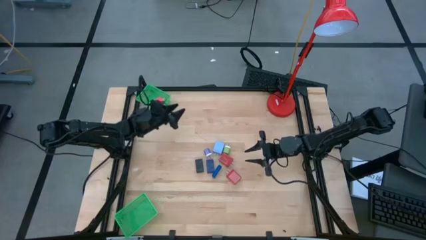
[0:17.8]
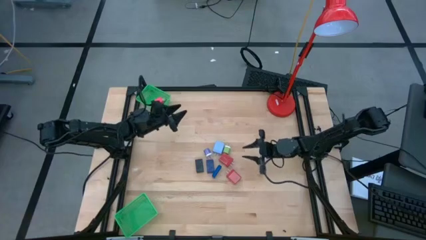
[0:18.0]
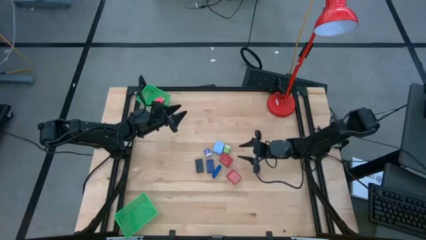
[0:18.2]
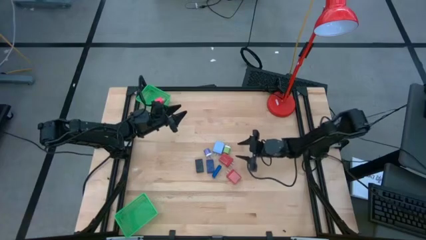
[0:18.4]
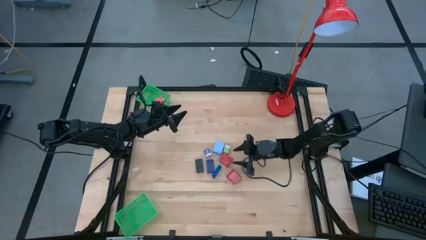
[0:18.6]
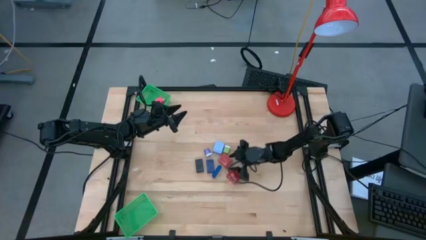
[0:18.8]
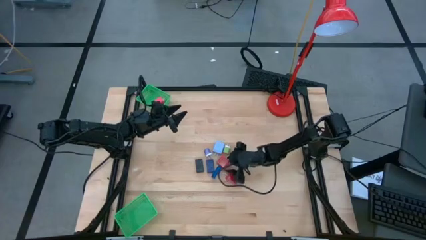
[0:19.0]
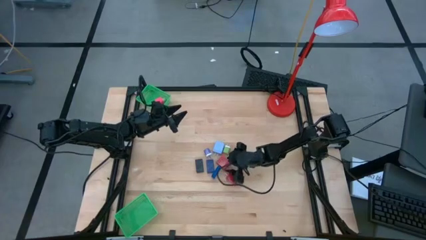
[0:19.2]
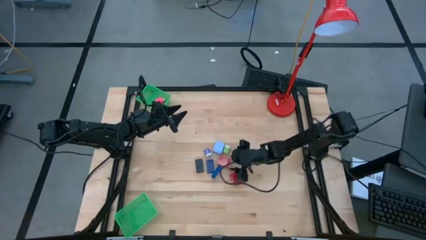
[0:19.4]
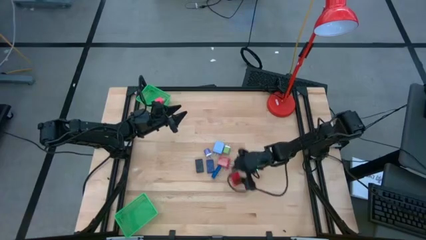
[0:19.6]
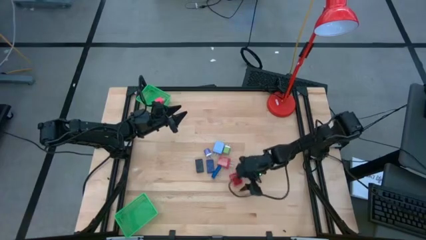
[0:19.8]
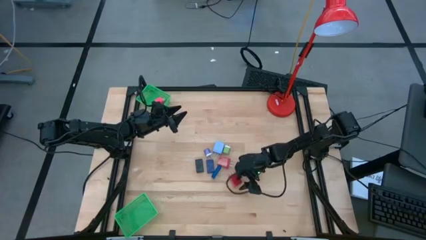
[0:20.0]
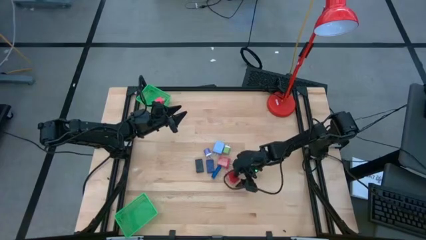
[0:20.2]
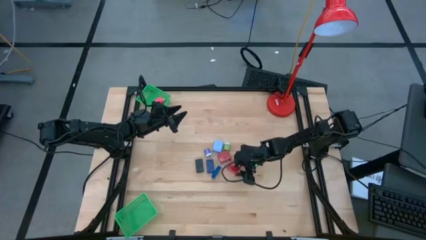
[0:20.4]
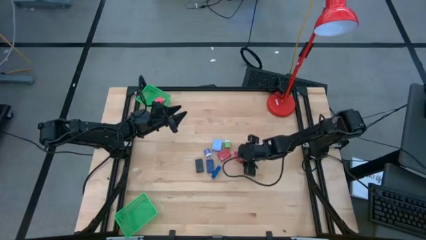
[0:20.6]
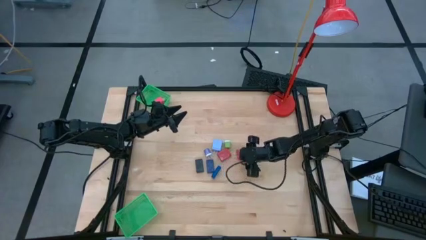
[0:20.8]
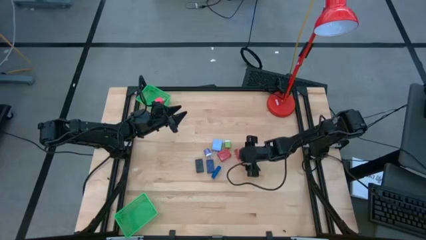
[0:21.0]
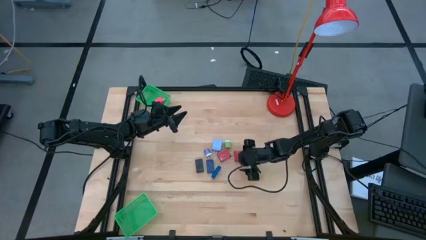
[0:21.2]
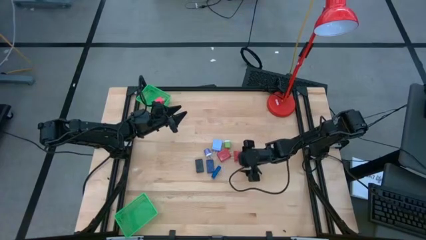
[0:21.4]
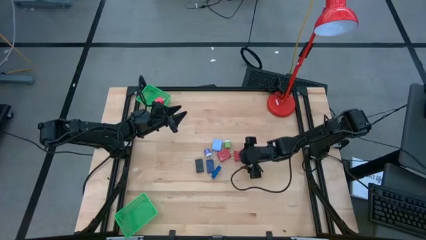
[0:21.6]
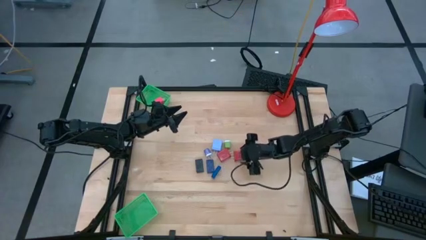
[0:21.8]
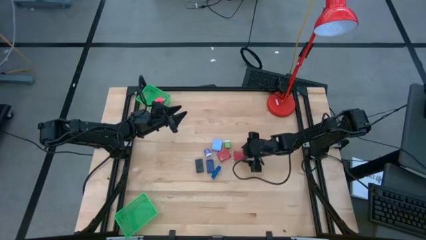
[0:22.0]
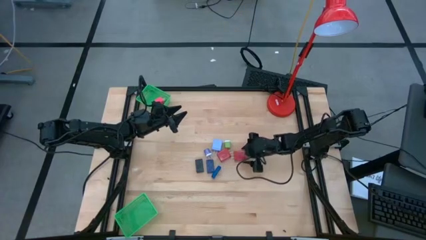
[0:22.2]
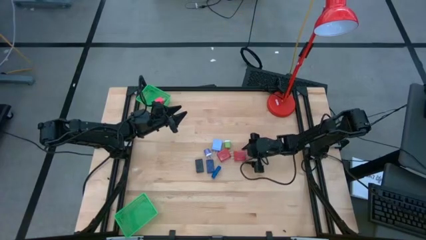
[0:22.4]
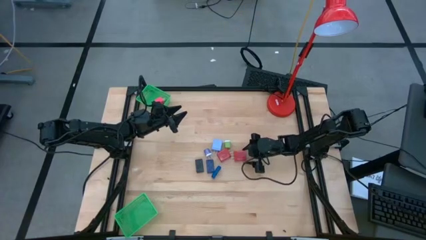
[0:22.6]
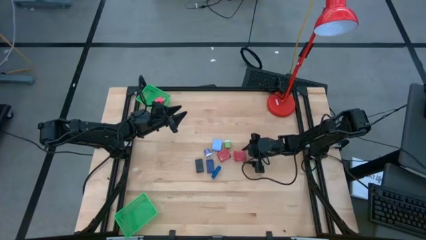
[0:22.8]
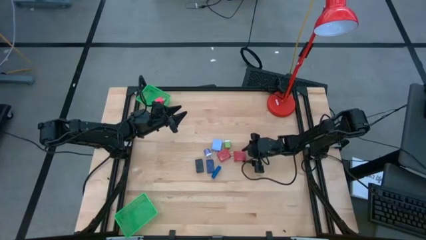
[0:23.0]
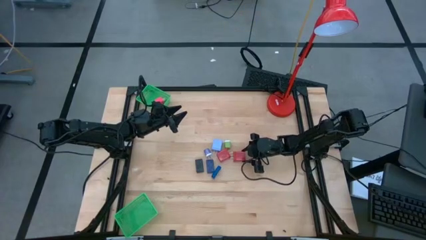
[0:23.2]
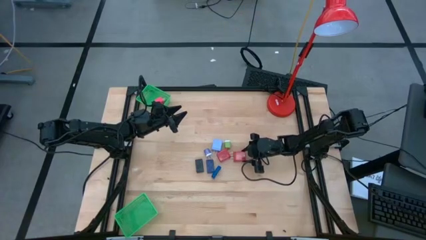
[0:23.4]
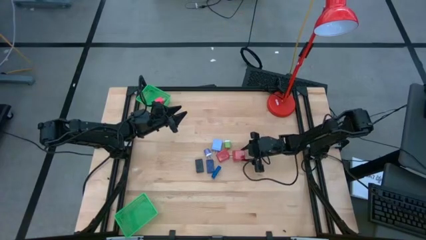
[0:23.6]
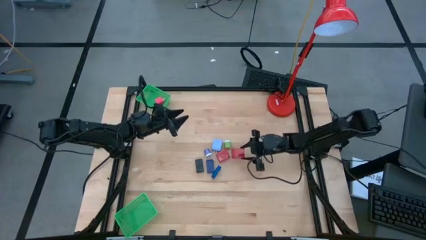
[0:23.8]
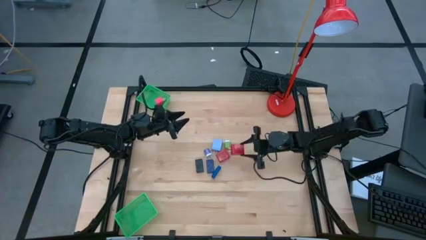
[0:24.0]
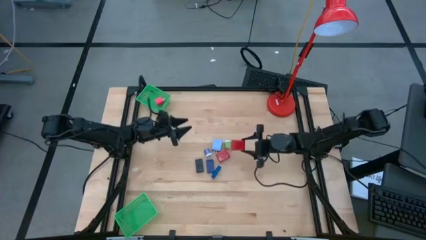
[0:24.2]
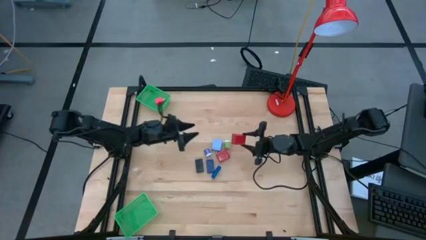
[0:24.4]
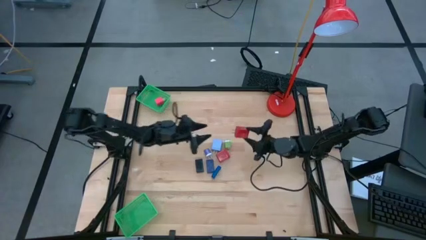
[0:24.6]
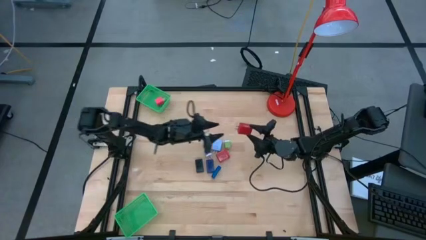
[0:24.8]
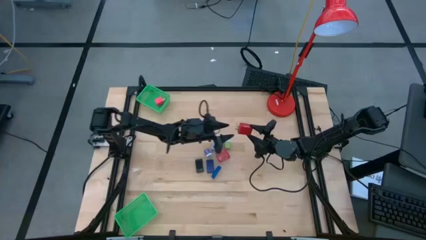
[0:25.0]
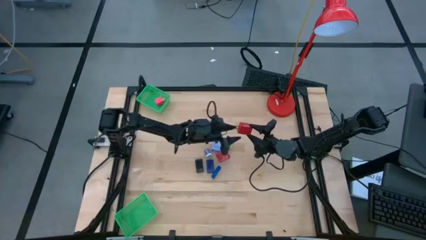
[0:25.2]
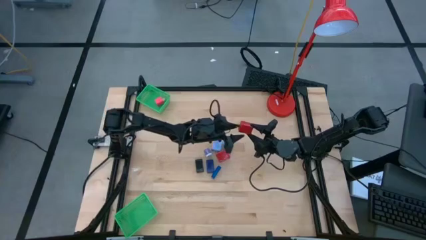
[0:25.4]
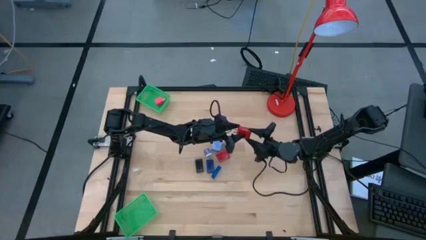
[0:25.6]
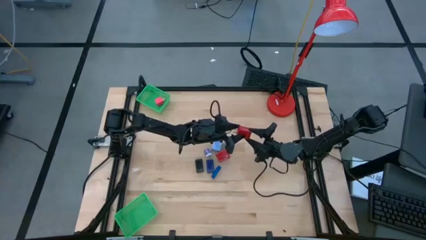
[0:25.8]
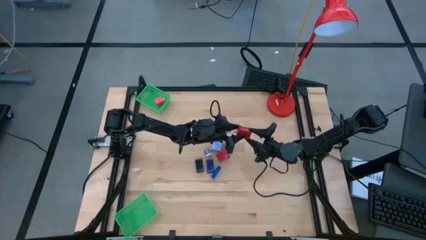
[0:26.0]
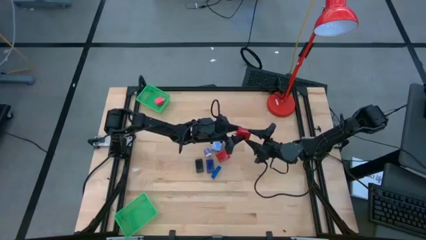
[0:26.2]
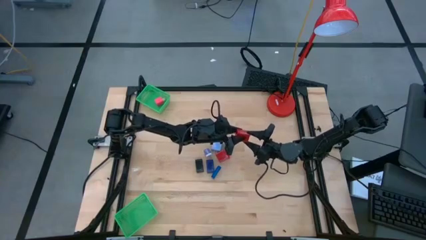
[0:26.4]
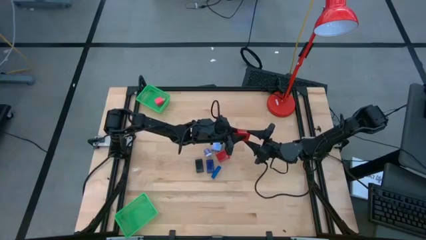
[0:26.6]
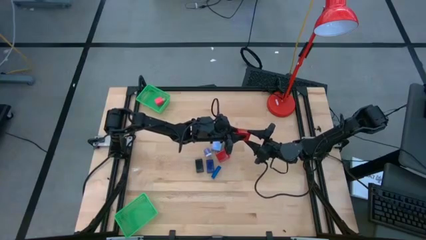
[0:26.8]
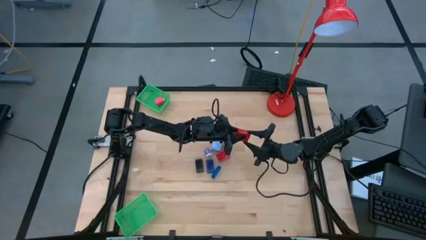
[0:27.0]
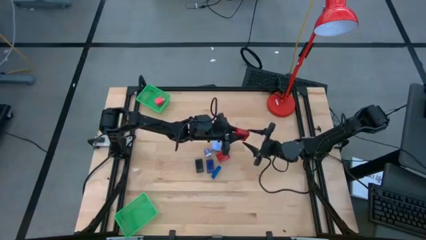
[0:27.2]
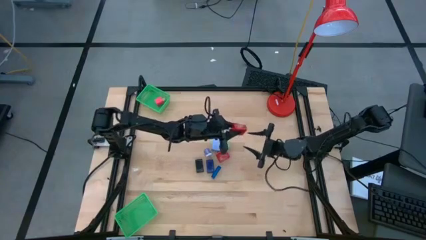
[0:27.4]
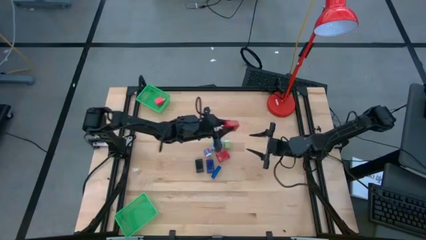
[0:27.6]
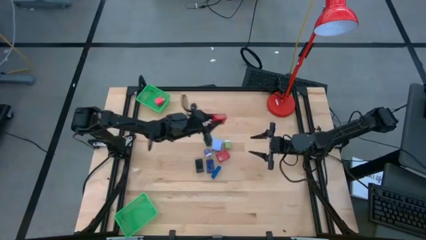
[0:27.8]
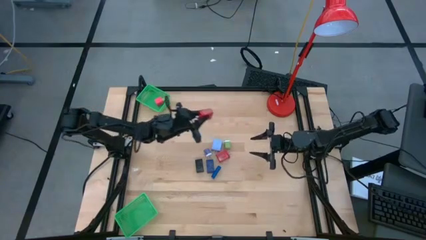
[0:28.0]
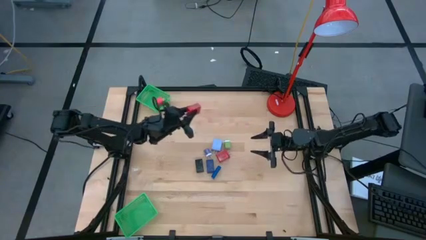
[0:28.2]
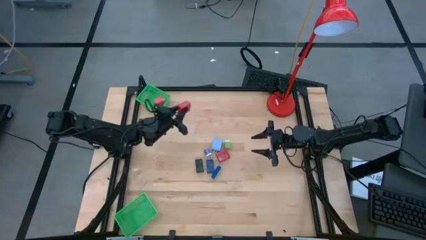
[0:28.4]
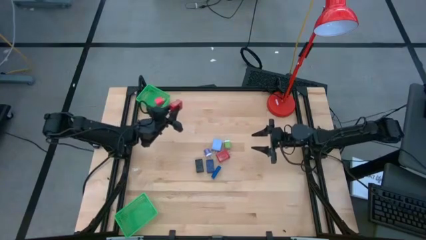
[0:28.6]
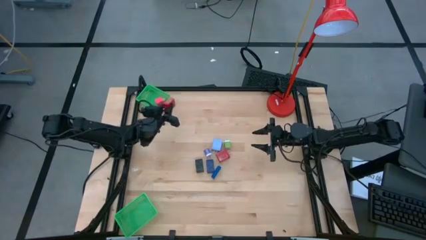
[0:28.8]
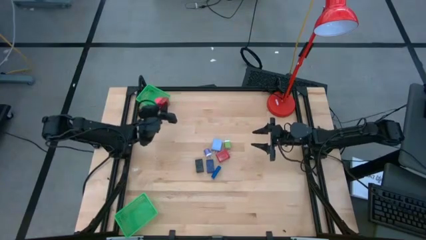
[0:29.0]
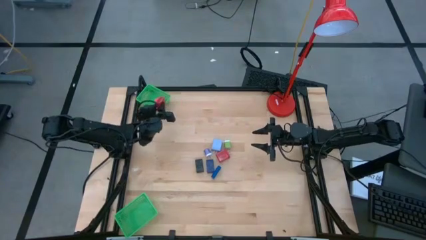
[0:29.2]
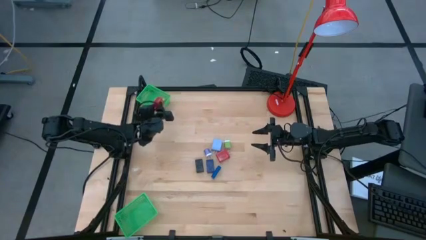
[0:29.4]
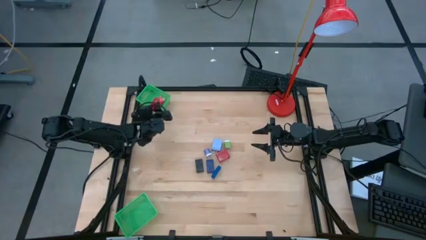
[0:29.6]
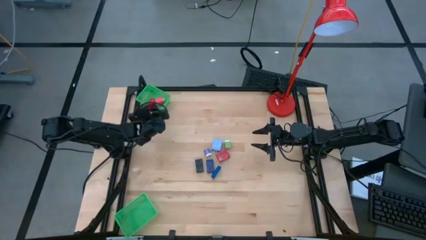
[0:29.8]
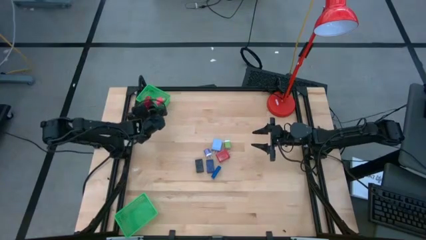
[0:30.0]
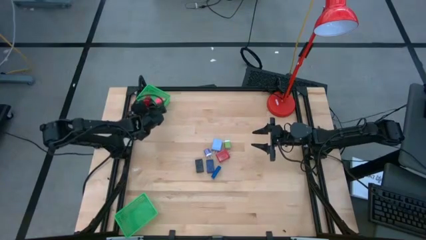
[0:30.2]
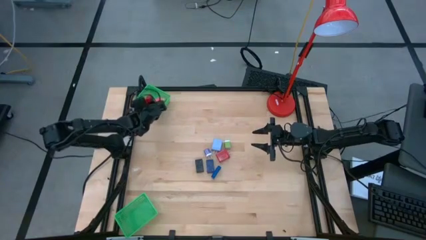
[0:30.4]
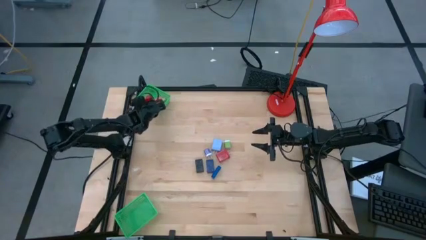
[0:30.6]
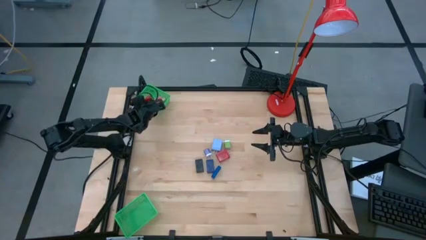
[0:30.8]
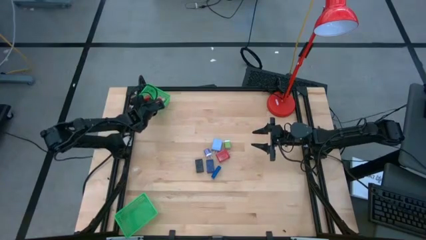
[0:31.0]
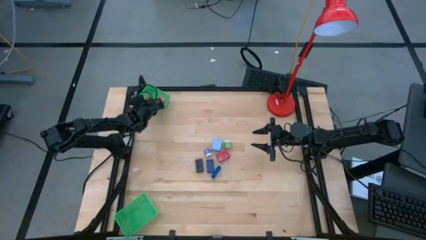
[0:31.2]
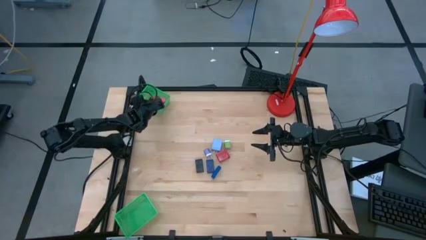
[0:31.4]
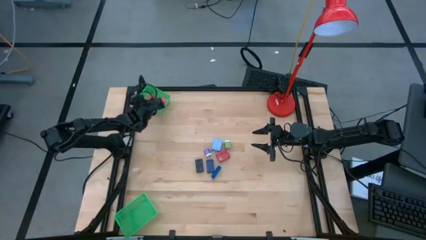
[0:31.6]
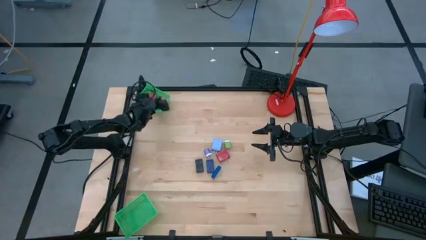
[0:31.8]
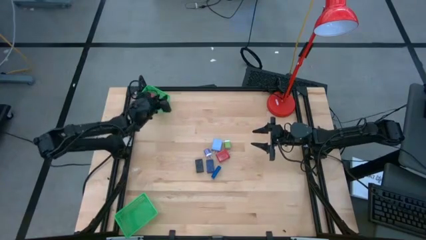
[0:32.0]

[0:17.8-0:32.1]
Task: Pick & Place Office items
Put the bottom red charger adapter into the top green basket
